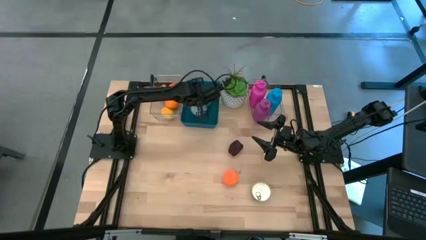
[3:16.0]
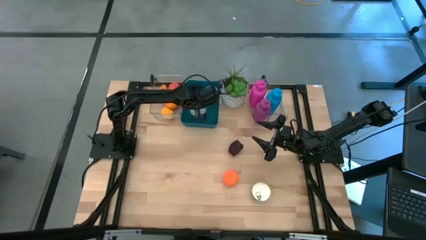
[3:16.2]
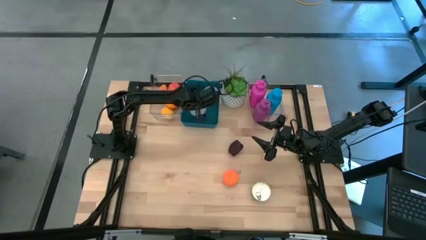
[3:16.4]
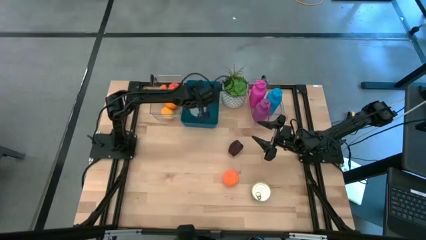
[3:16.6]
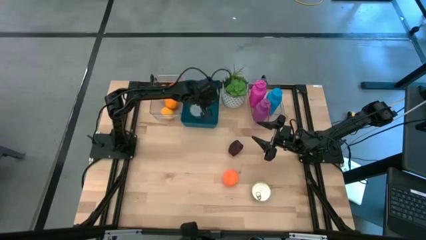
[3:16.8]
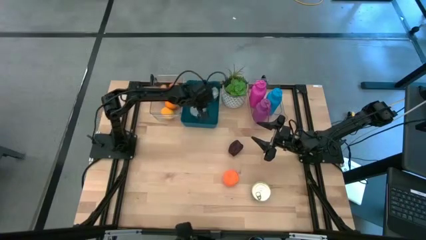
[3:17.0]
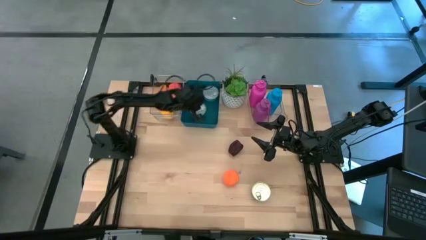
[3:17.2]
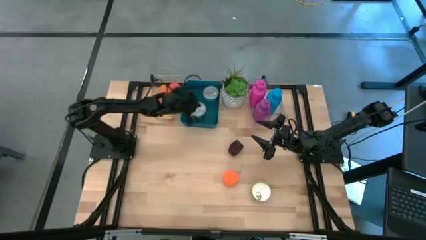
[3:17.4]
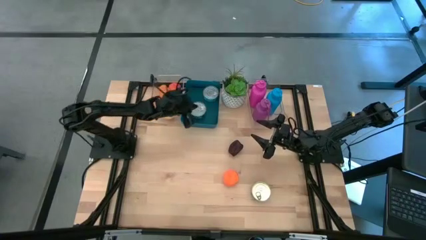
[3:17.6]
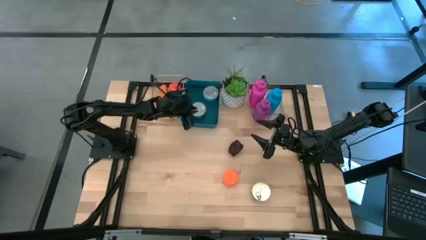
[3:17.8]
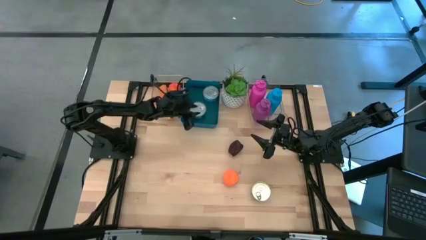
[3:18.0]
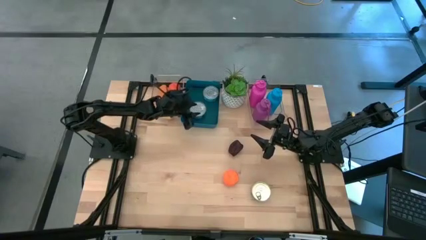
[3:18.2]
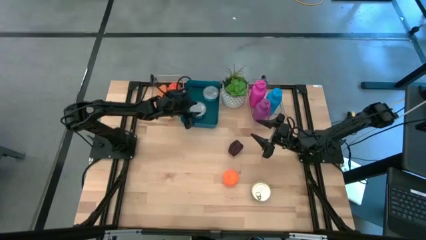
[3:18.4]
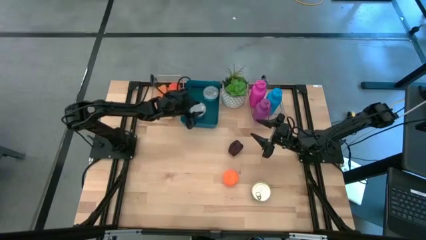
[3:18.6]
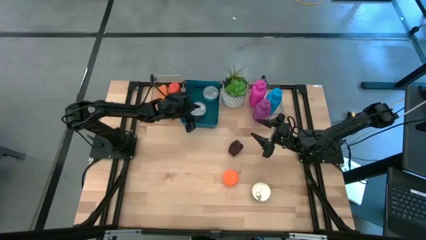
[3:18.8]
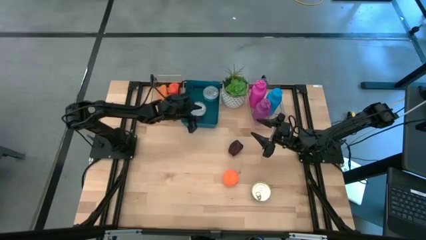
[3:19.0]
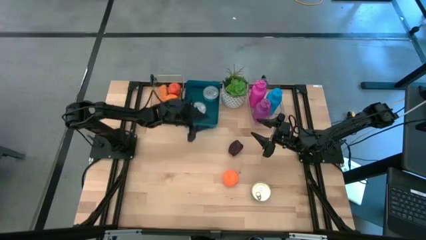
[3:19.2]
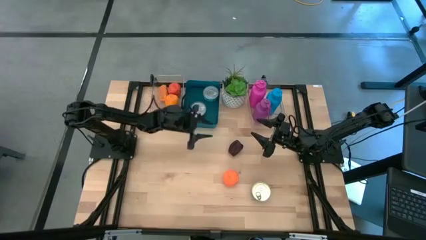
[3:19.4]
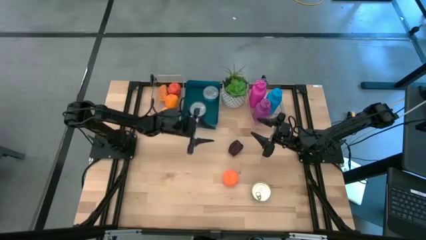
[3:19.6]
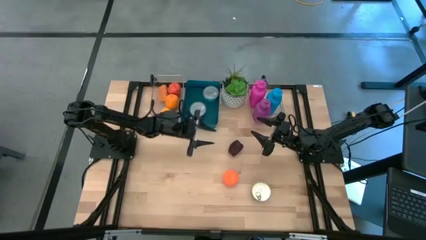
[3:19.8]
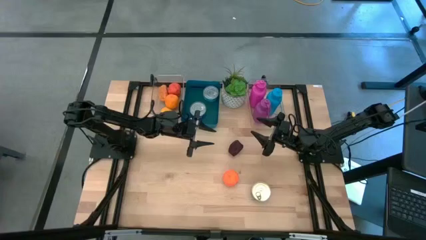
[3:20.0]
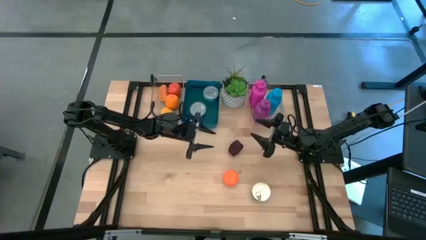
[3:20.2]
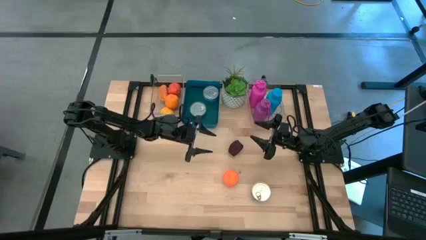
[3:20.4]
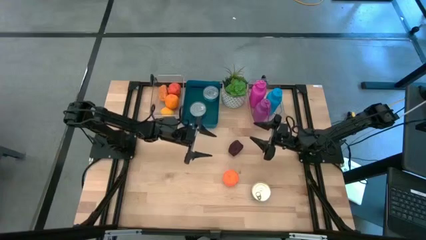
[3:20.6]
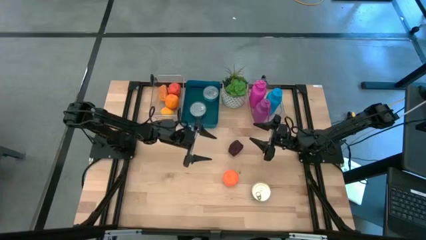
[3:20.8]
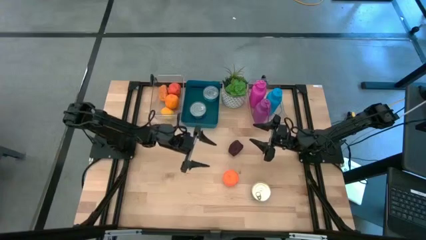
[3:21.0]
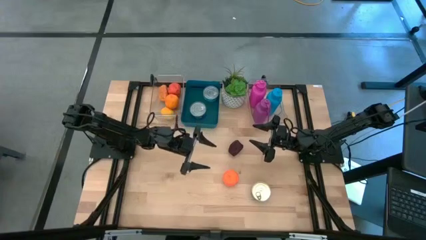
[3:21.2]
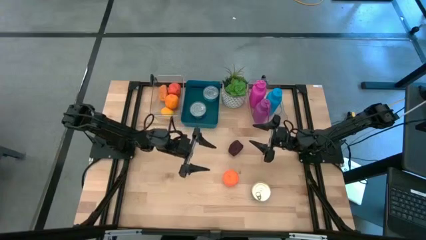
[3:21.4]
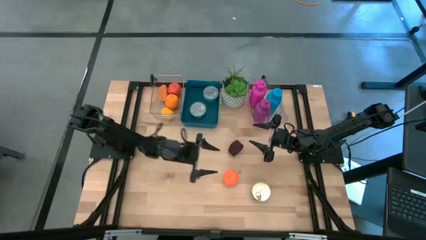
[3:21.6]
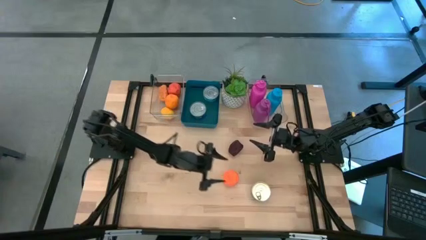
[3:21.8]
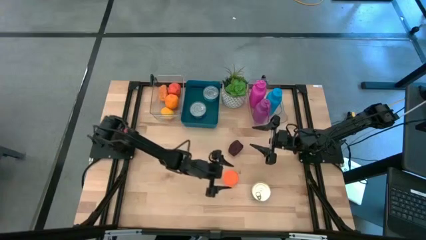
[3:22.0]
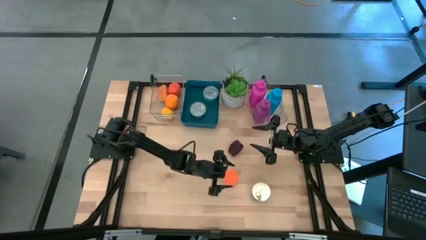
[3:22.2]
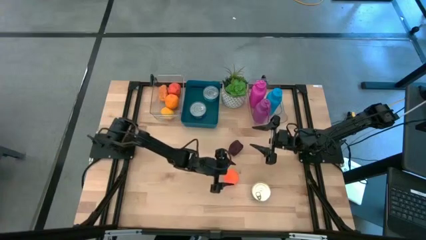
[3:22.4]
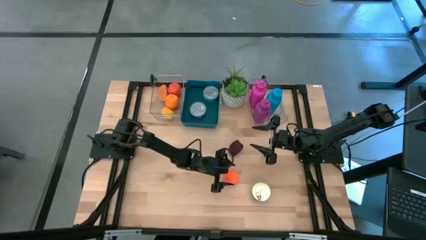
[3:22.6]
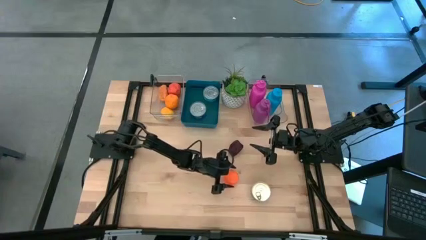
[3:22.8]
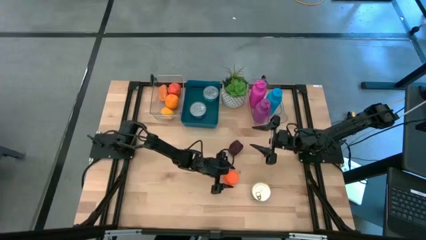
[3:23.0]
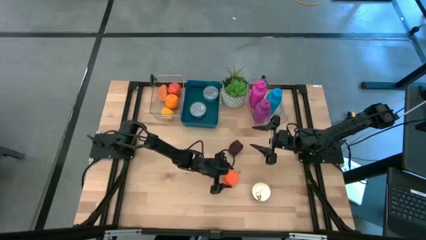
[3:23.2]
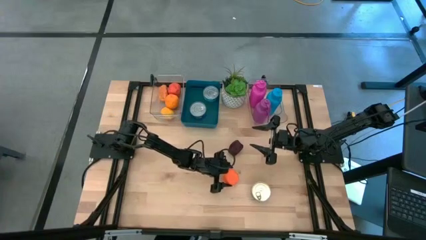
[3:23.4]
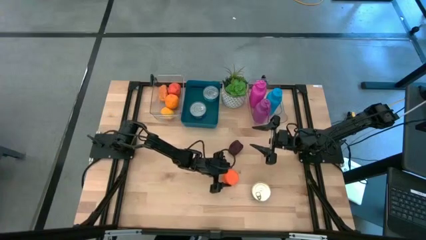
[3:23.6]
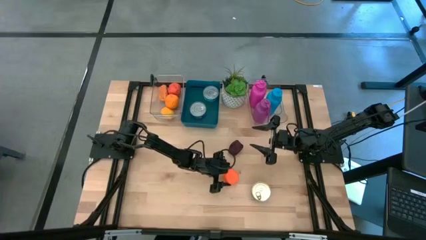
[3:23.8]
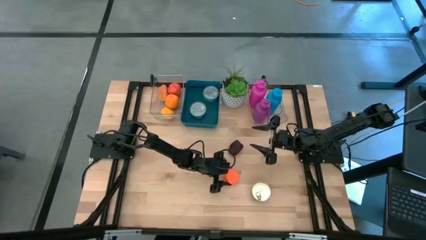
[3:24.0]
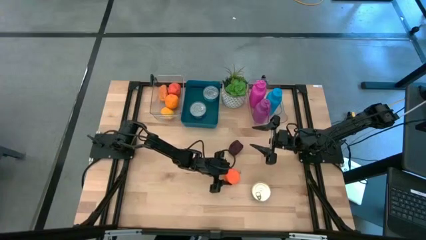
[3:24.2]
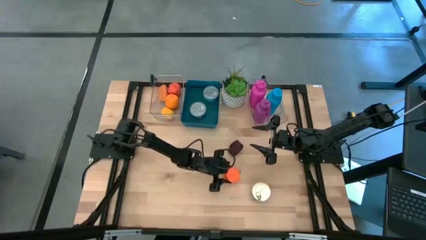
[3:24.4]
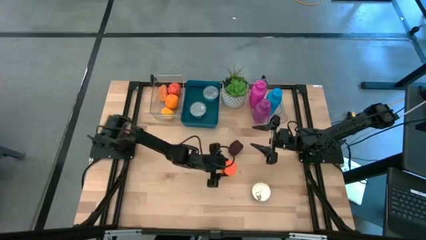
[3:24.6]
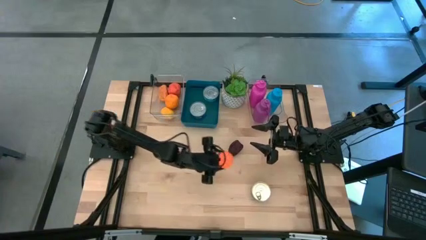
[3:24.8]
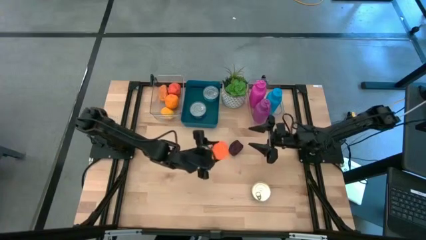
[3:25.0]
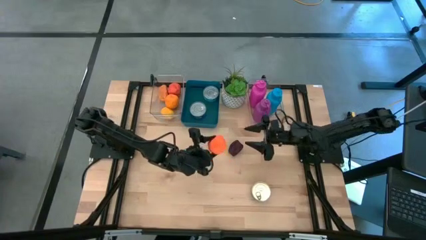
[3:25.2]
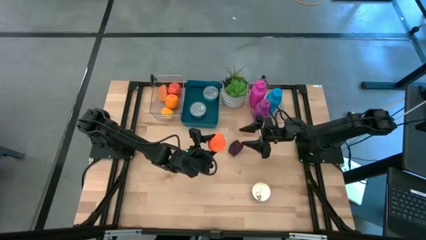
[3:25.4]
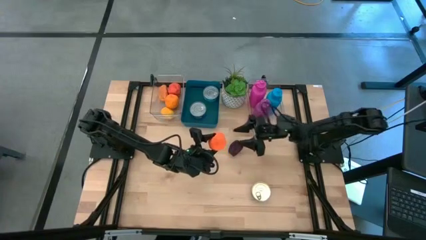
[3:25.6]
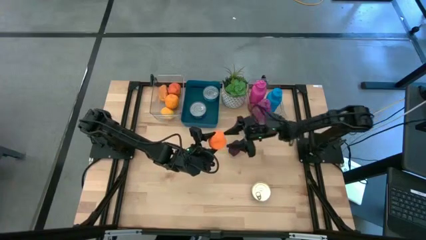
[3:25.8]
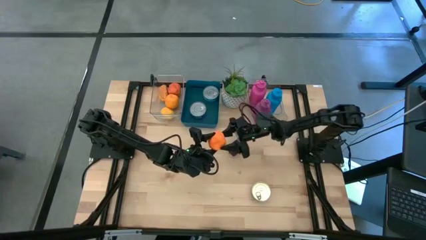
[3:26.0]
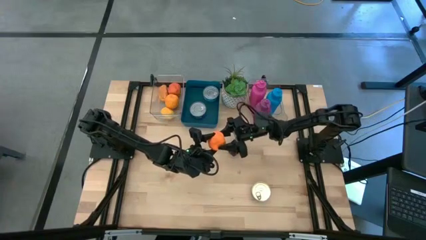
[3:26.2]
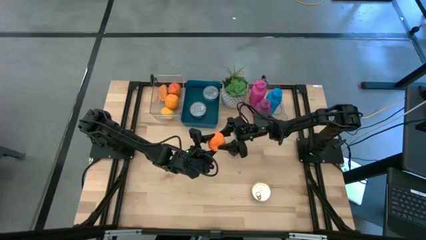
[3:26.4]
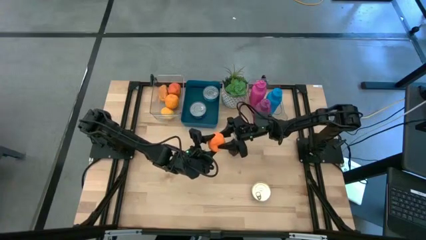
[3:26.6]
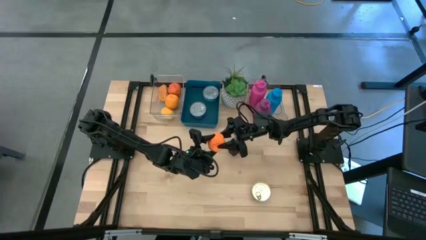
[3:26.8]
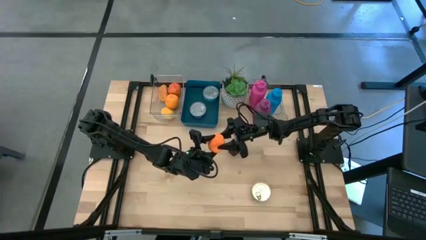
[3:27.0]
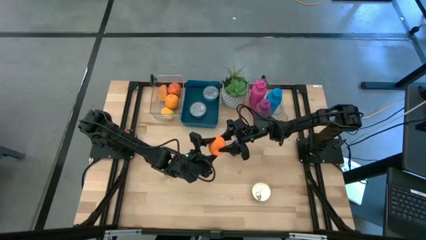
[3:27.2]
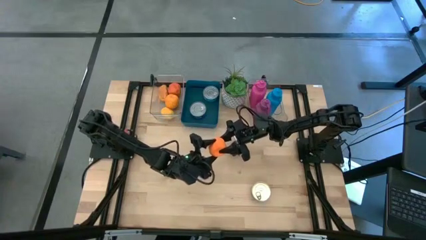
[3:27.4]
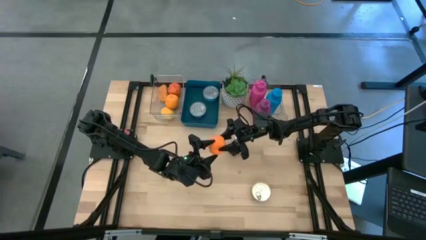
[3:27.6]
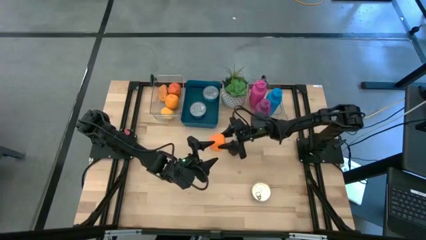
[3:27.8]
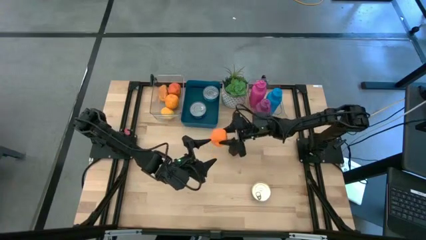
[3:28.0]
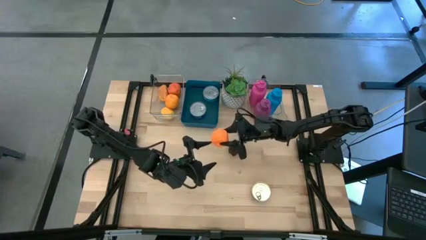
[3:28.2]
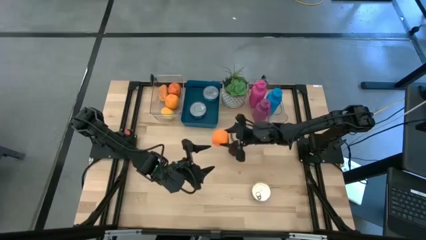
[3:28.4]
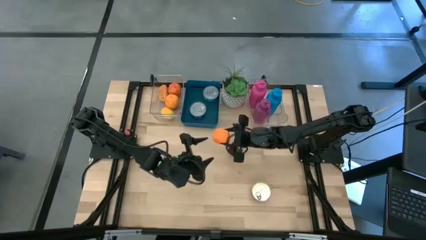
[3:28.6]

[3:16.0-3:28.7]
Task: Pick & Place Food Item
Put the orange into the left transparent bin

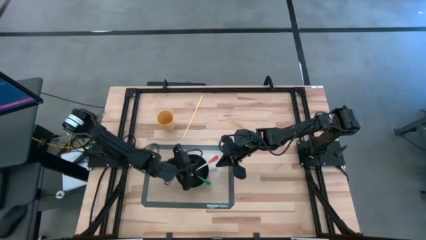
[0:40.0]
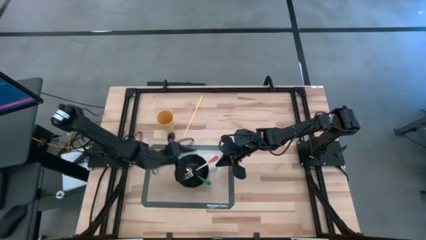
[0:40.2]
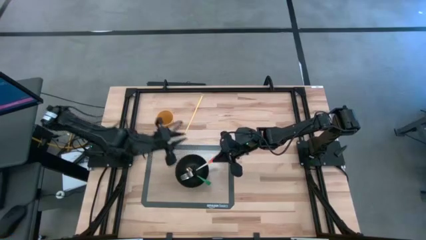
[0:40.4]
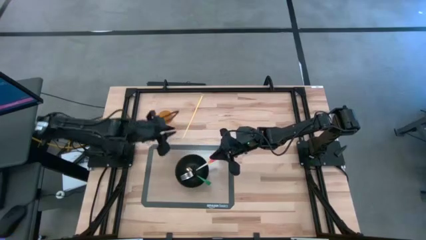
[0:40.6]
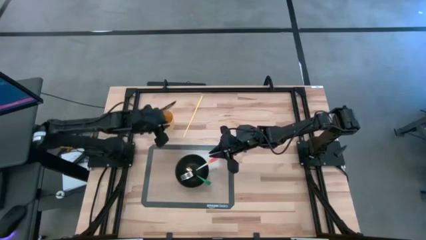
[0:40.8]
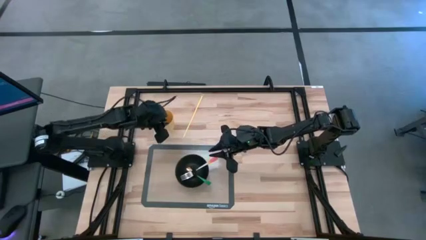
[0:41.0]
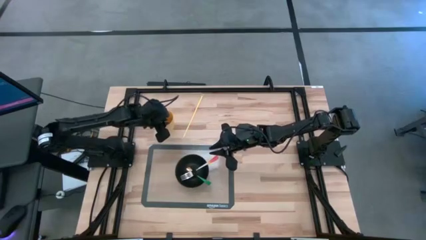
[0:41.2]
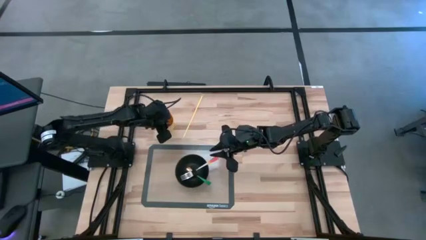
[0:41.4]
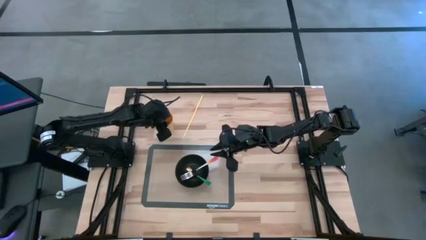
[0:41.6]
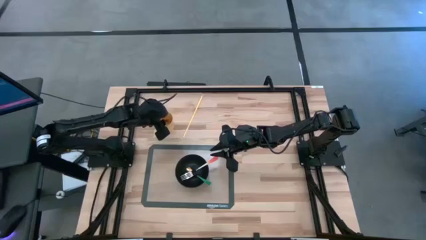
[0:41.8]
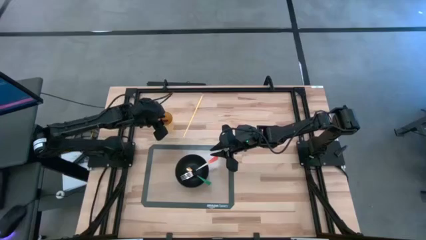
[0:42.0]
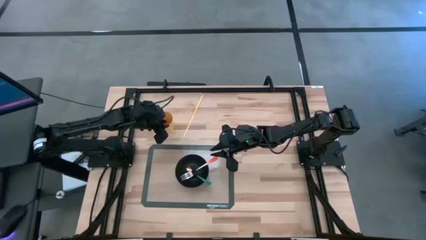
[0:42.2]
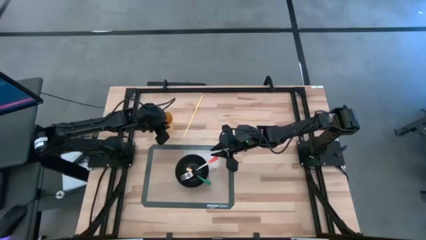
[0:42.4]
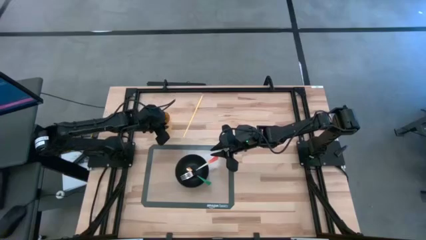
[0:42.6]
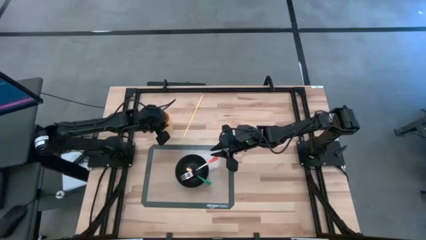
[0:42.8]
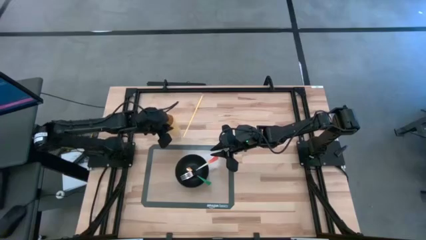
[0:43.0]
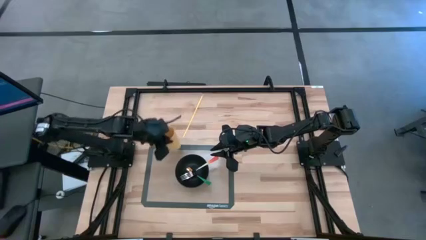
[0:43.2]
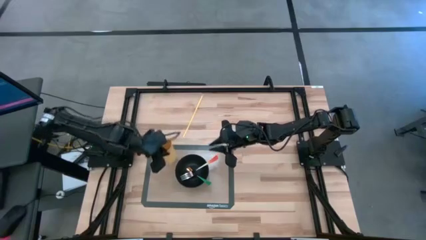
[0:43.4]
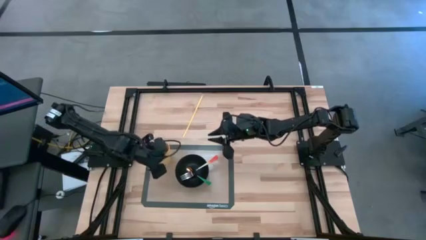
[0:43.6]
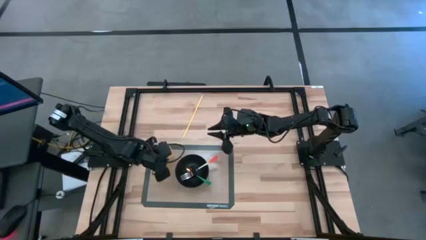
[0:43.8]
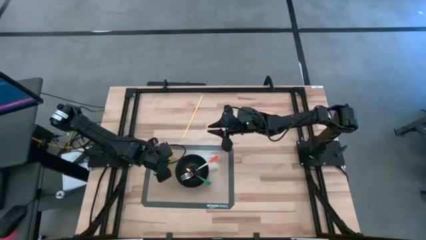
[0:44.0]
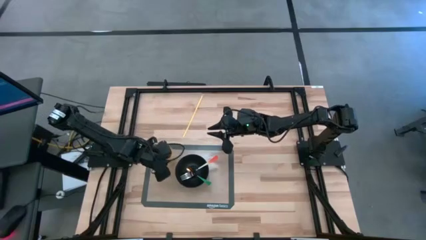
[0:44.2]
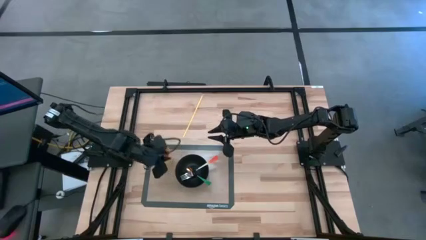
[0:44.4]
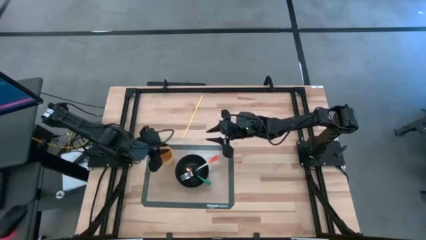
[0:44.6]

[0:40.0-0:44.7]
Task: Pick & Place Utensil
Put the yellow cup on the left side of the silicone mat
